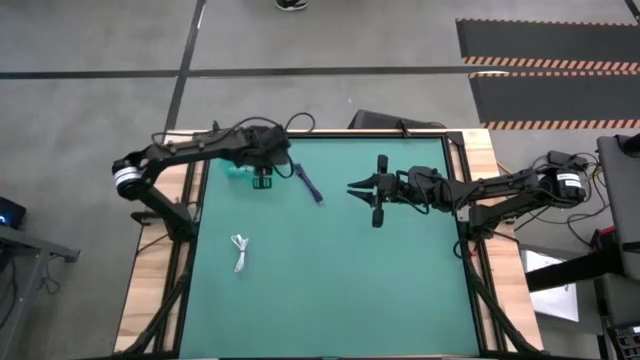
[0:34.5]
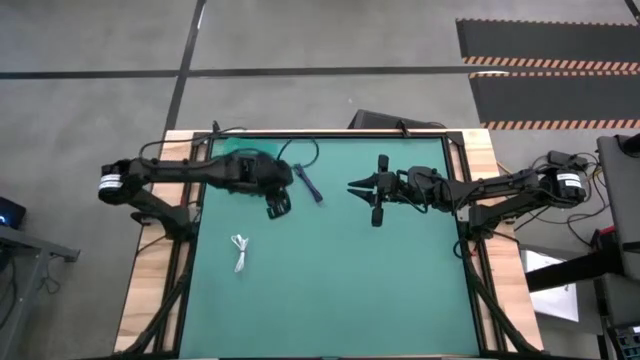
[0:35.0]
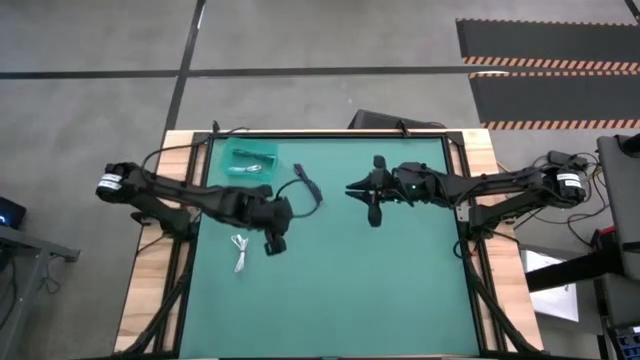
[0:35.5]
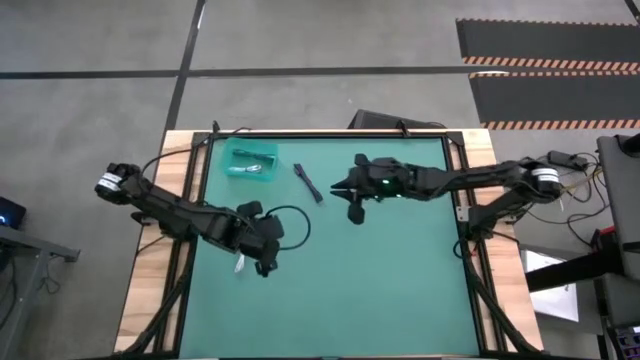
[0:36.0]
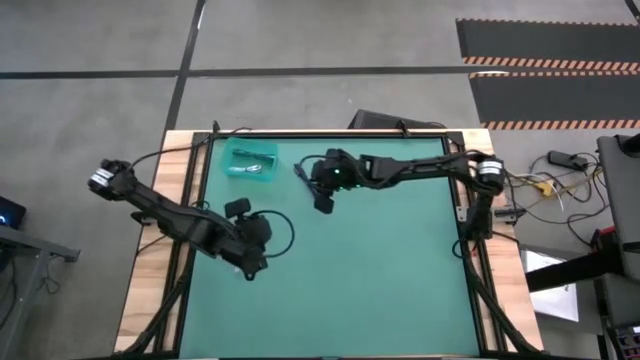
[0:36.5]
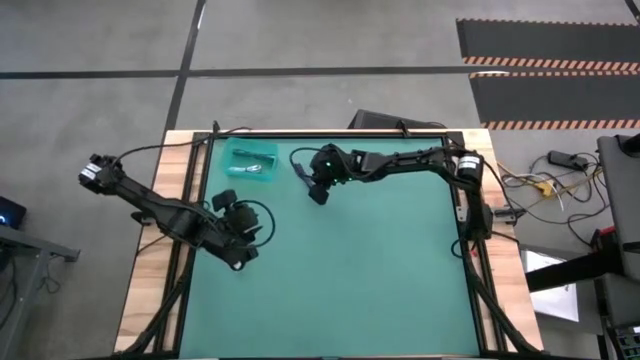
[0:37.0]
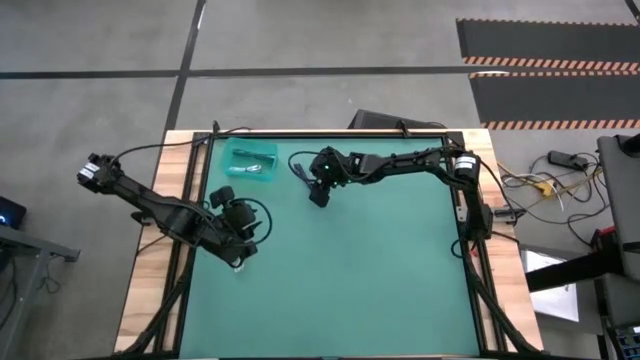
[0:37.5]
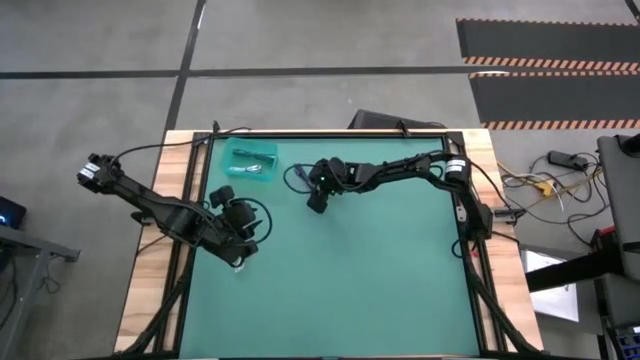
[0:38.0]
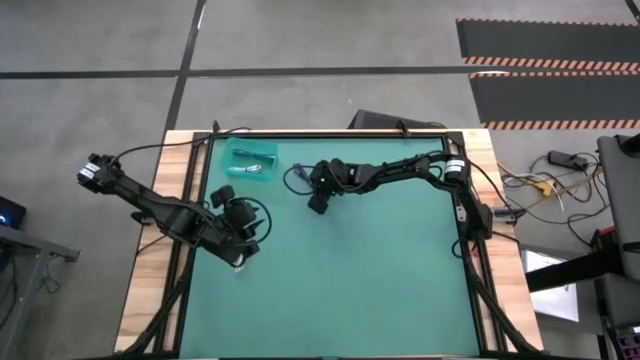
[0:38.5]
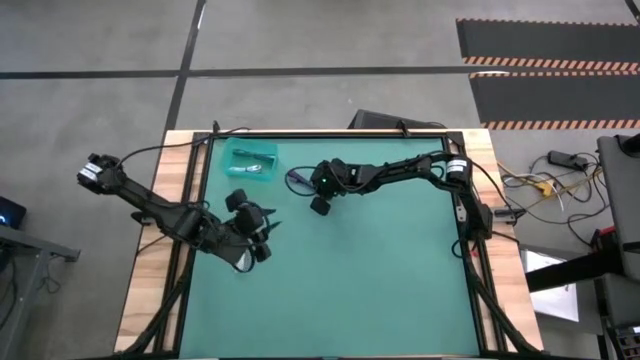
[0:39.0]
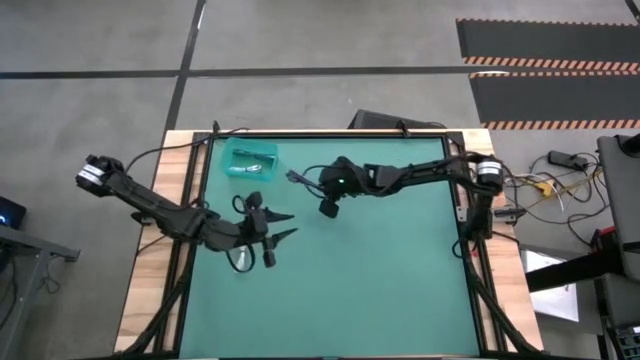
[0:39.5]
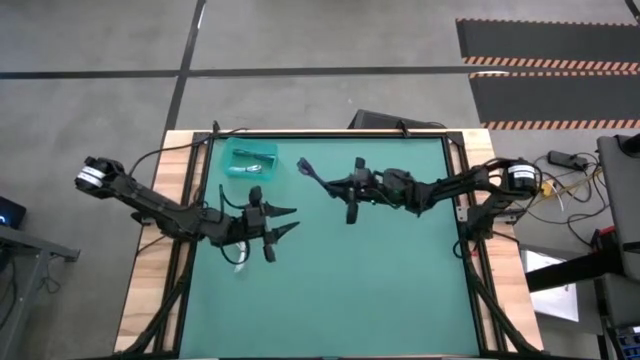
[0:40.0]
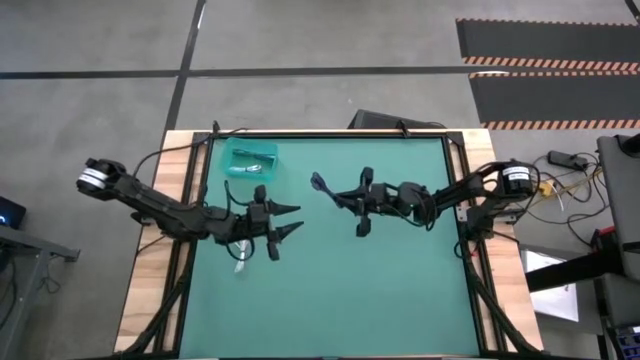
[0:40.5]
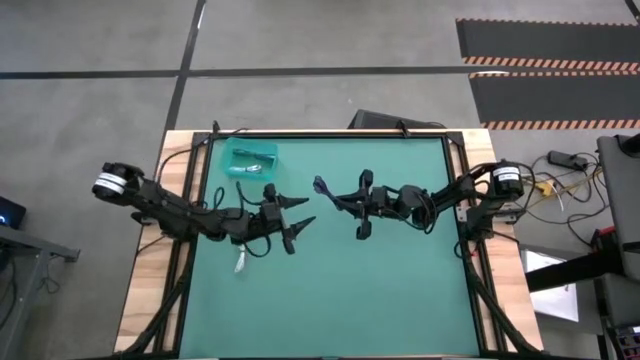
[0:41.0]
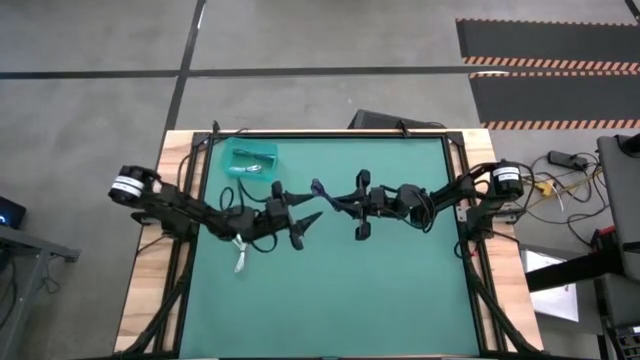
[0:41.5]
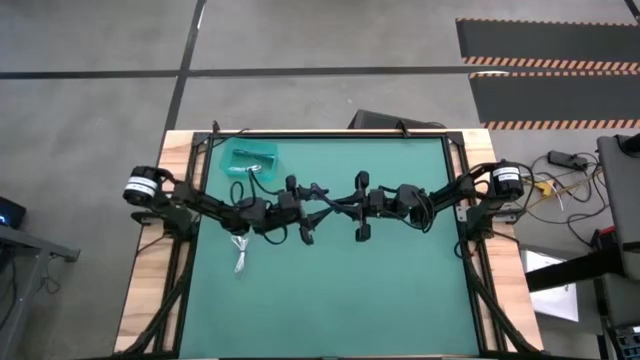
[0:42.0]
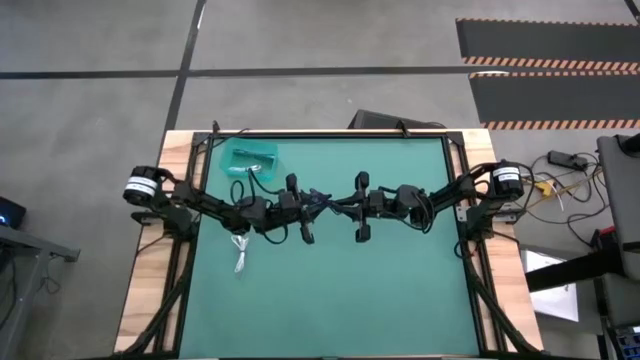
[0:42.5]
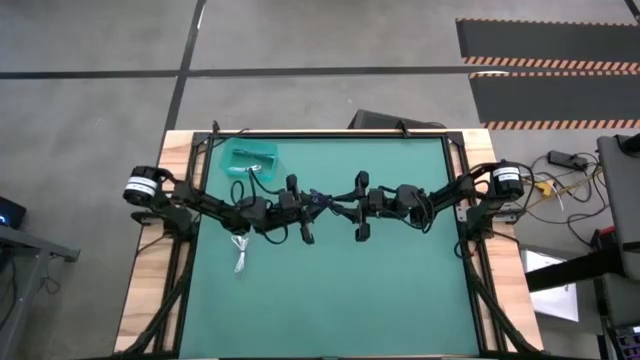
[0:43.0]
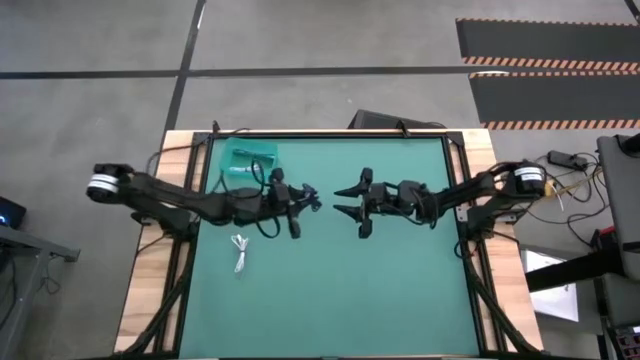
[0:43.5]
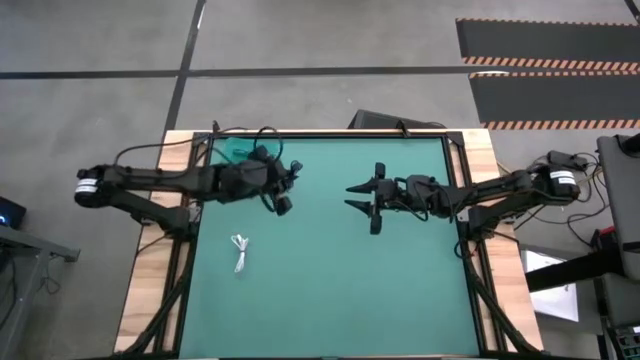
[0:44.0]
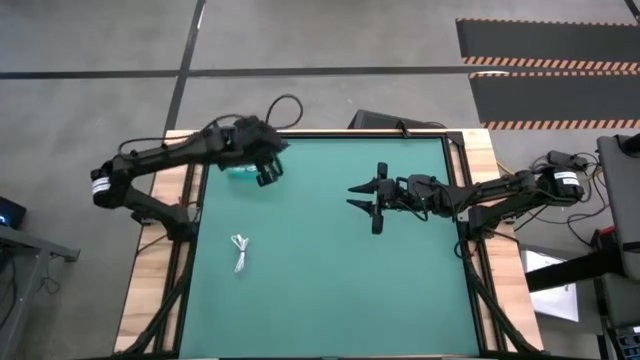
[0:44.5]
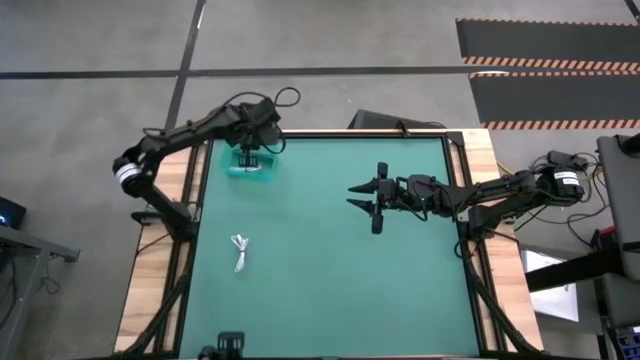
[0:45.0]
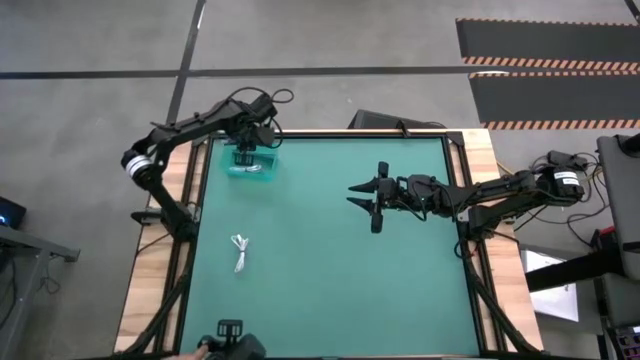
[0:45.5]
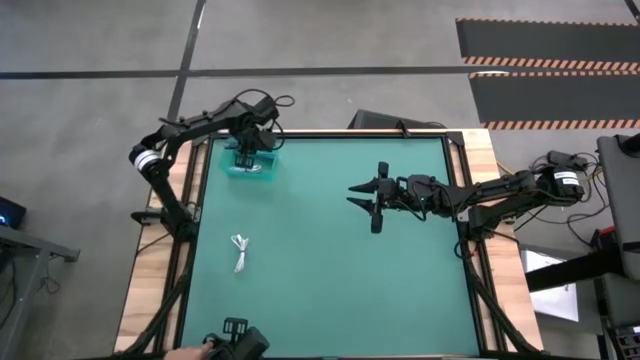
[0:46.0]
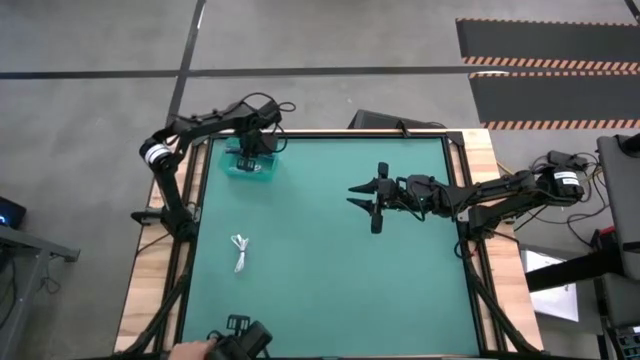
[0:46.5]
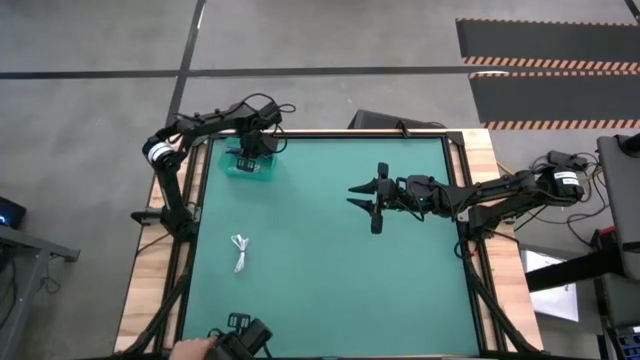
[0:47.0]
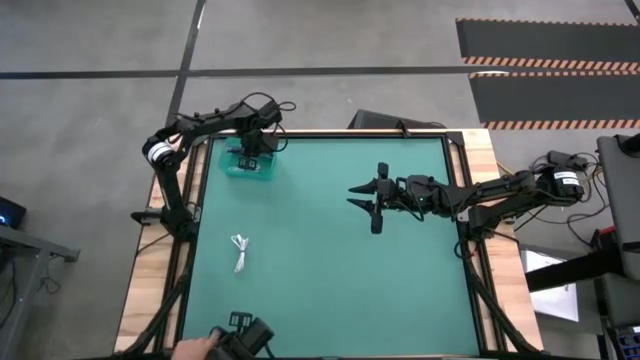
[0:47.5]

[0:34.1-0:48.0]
Task: Pick and place USB-C Cables
Put the purple charger cable into the blue bin

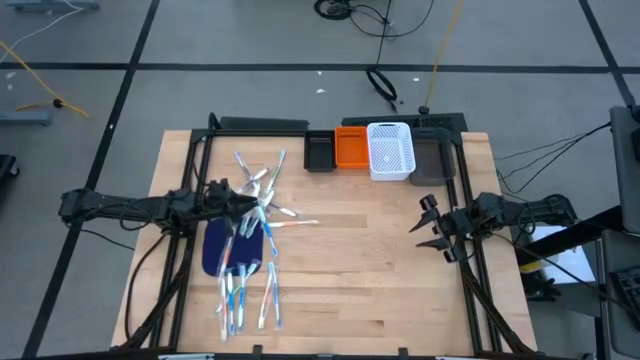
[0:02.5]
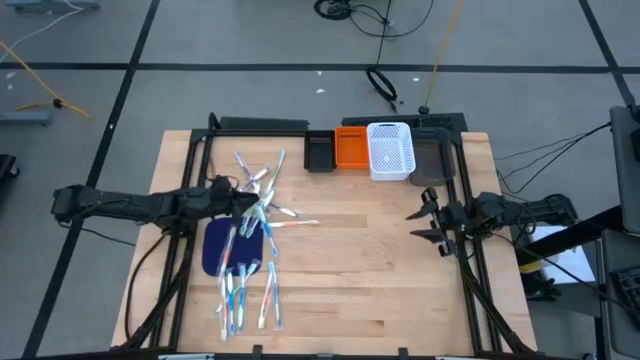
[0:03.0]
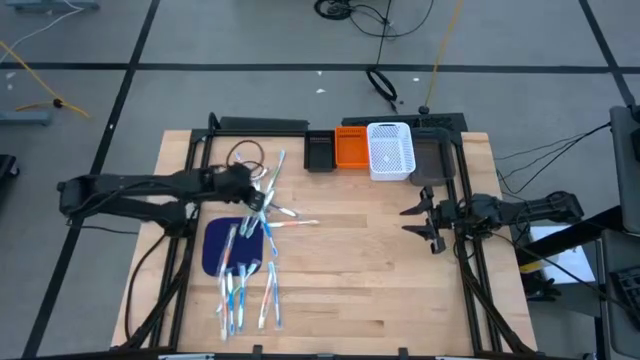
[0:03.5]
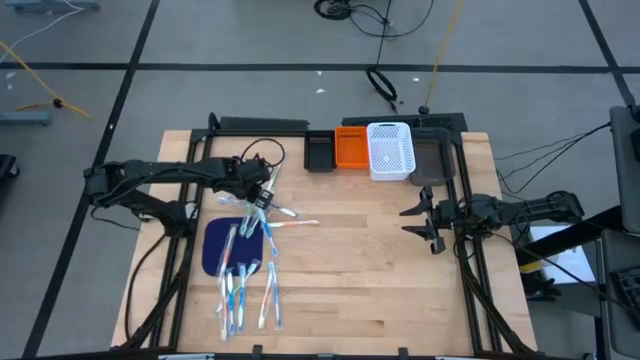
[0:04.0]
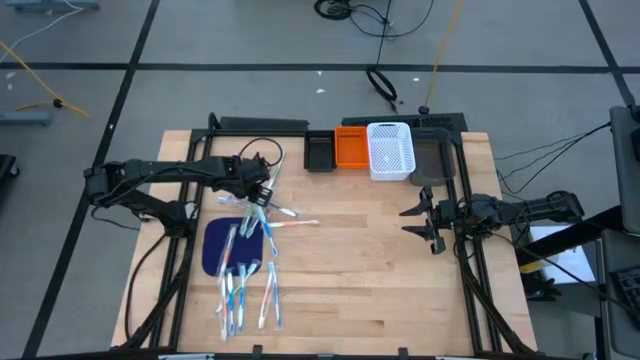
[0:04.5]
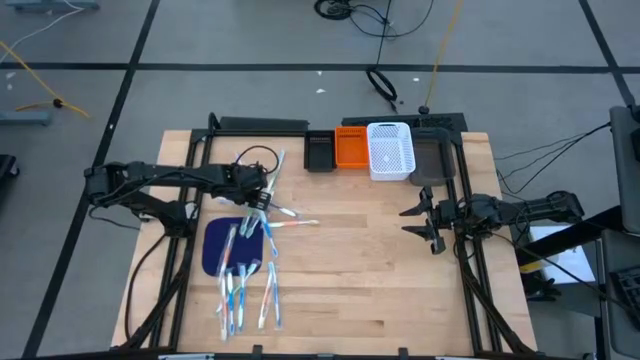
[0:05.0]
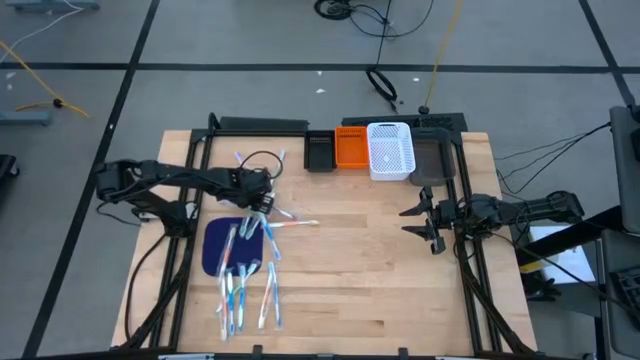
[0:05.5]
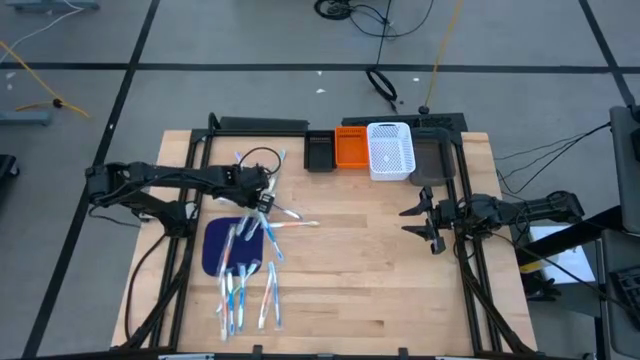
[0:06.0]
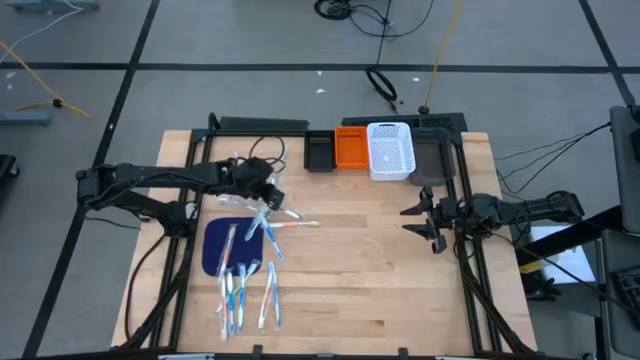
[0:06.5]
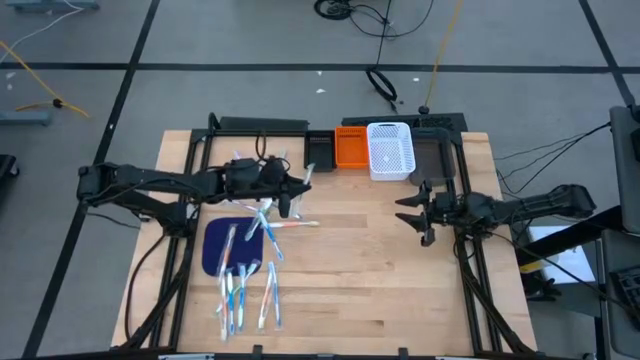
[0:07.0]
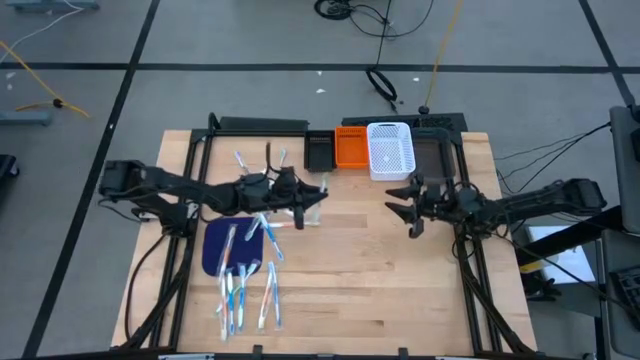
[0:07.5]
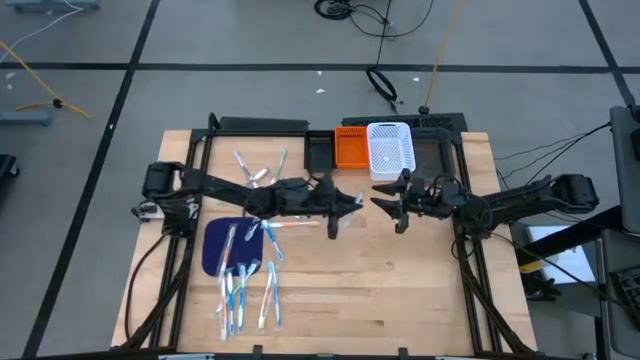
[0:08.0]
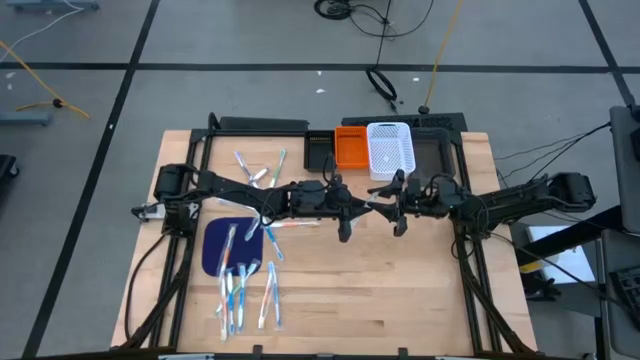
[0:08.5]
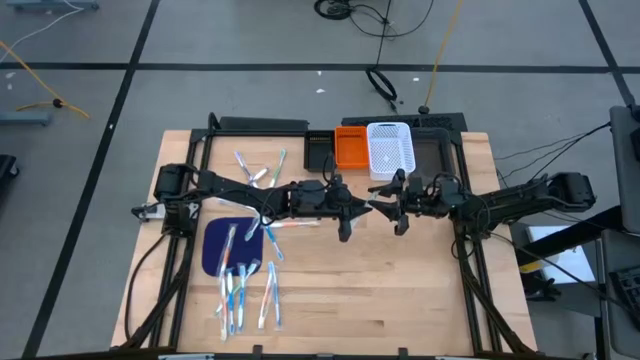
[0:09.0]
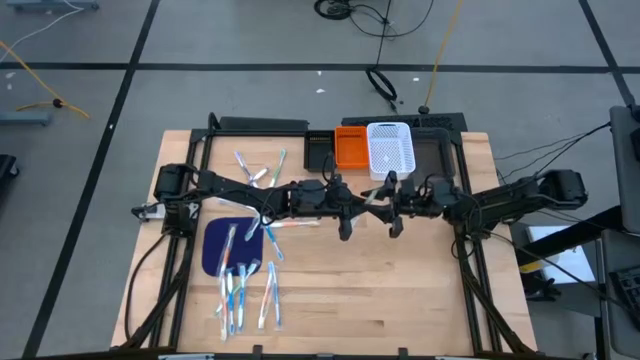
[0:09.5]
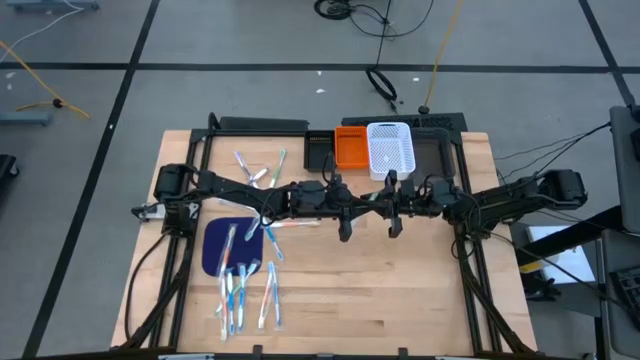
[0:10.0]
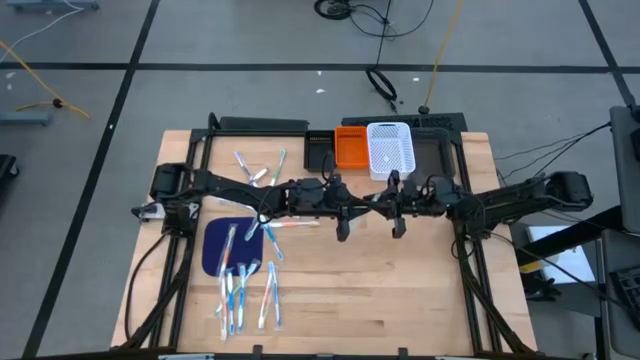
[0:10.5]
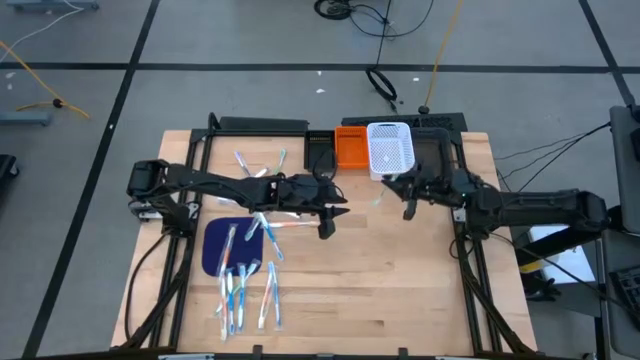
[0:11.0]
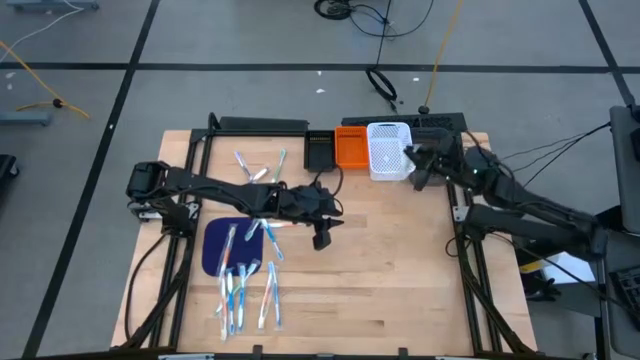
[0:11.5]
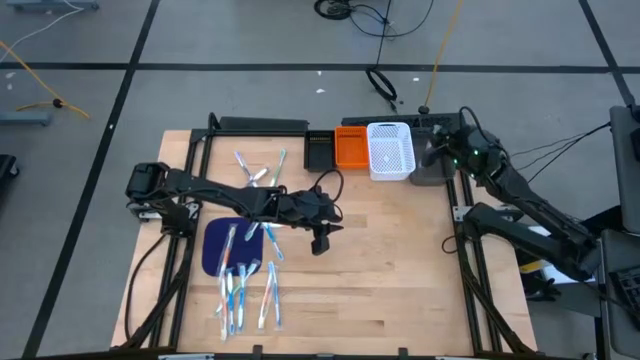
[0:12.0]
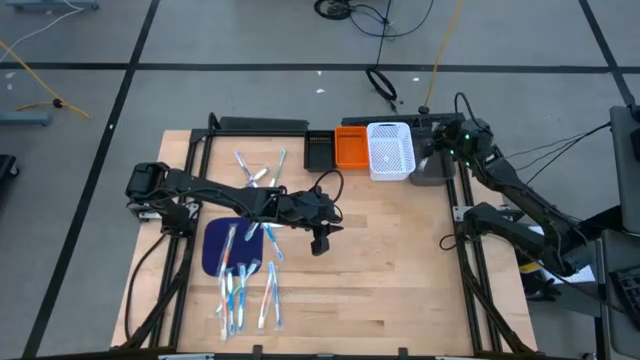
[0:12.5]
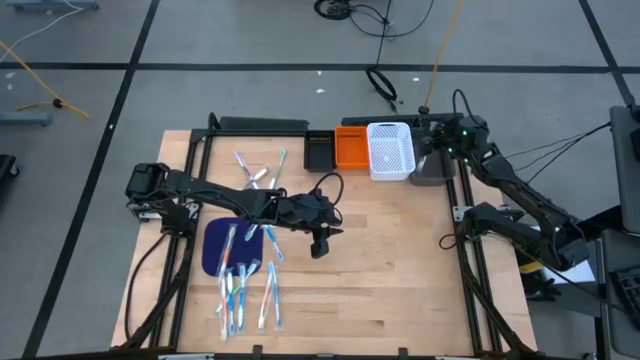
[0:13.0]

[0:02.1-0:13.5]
Task: Pick & Place Toothbrushes
Put the green toothbrush into the gray bin
